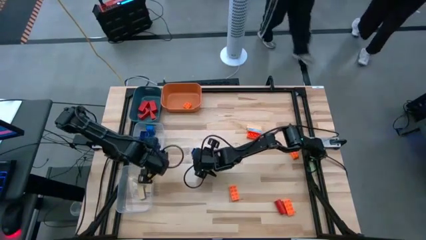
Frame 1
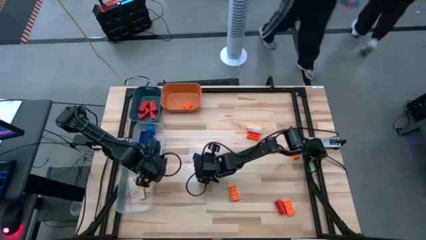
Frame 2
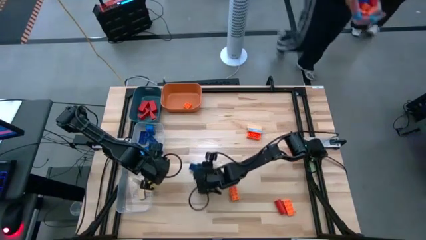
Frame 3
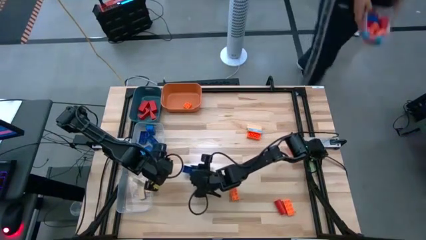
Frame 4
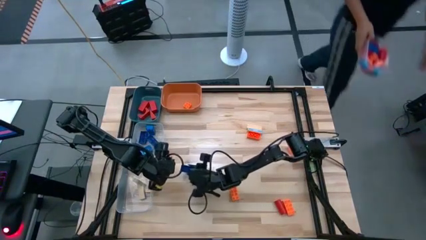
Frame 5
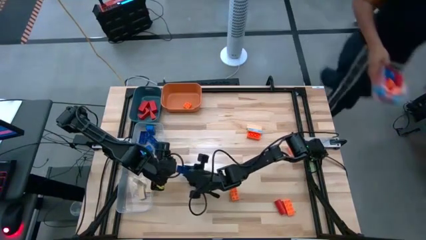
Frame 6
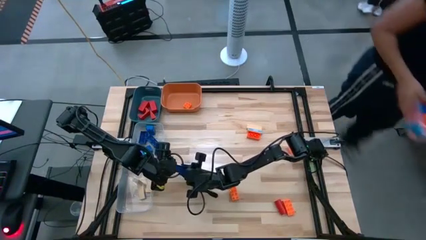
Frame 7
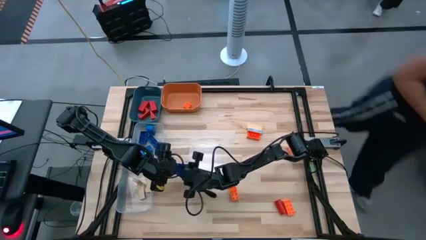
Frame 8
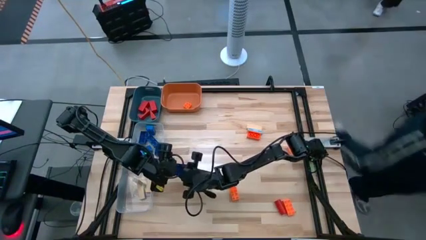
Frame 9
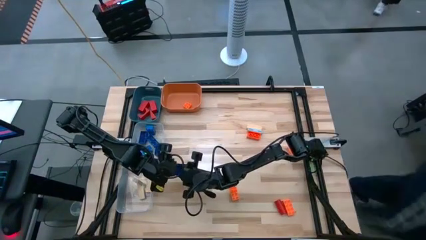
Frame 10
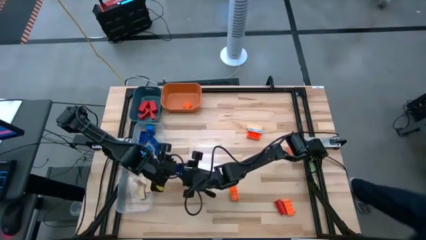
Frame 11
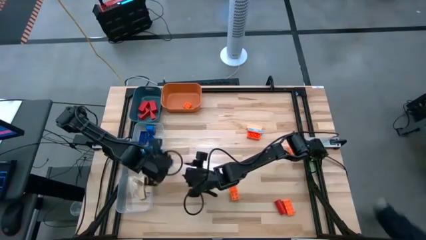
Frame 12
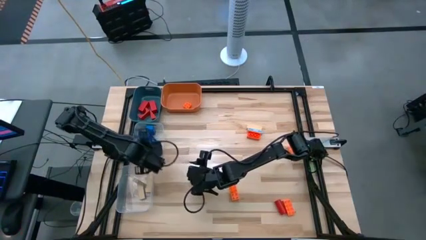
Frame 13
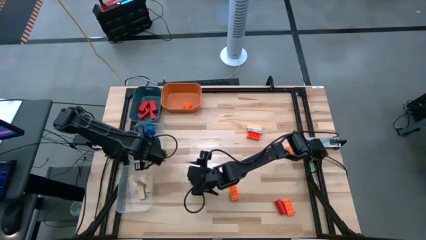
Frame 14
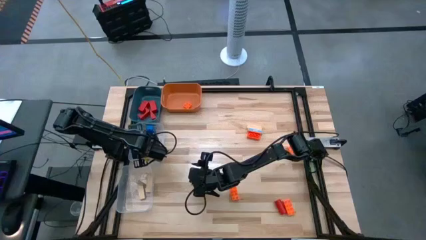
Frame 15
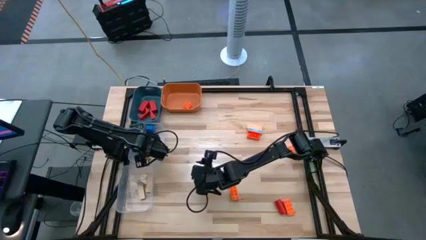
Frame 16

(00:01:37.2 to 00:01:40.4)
Task: Sort blocks
Put the blue game piece into the top transparent bin

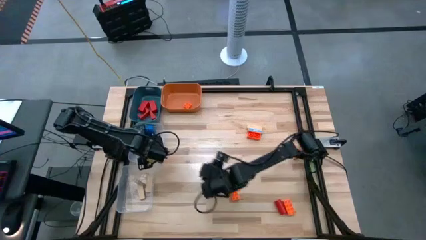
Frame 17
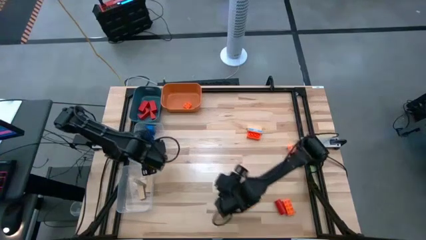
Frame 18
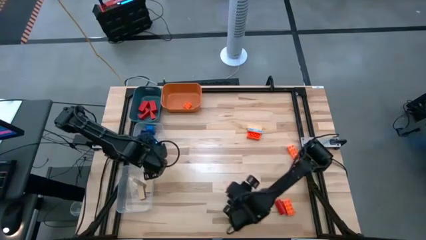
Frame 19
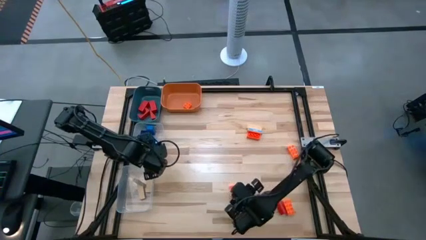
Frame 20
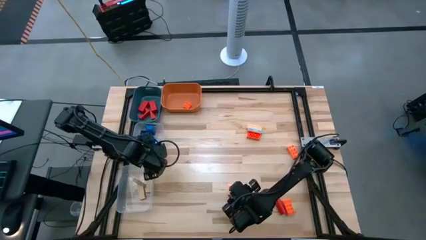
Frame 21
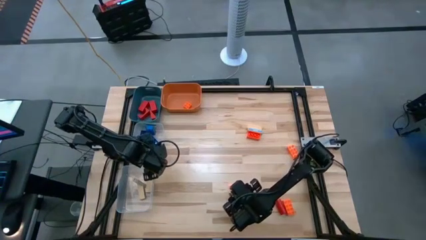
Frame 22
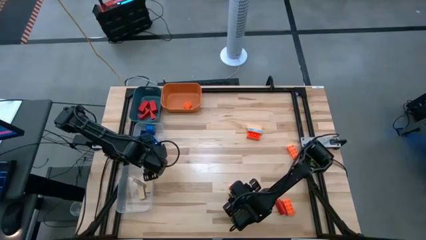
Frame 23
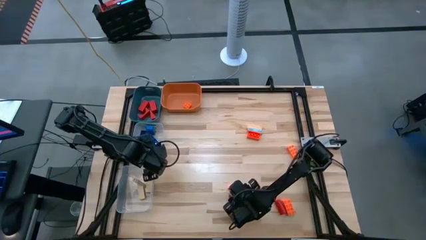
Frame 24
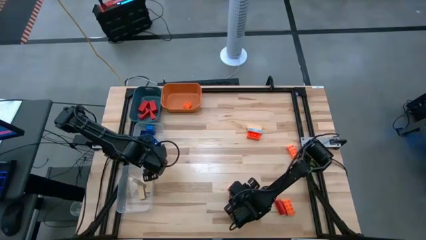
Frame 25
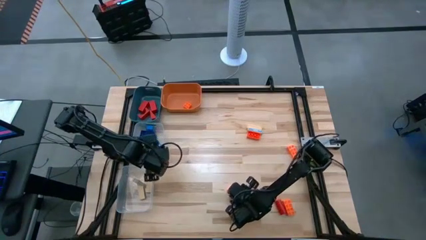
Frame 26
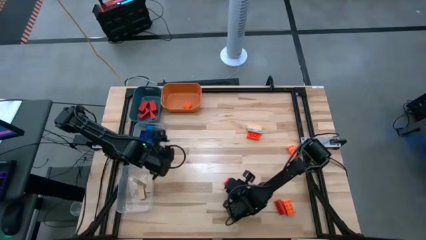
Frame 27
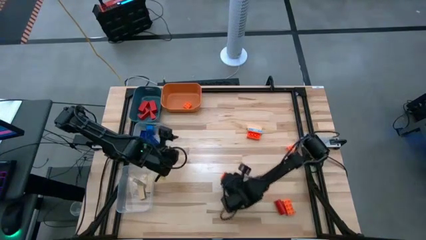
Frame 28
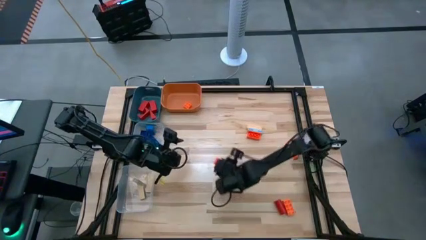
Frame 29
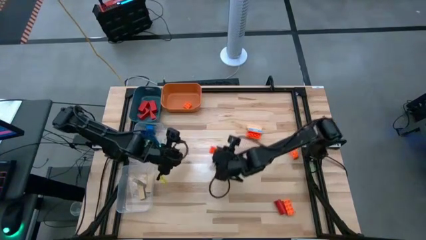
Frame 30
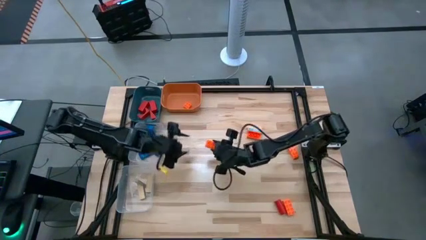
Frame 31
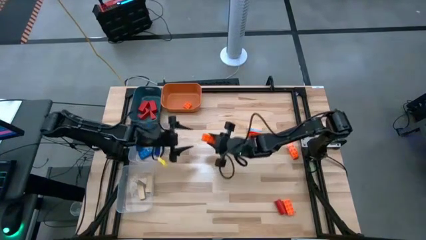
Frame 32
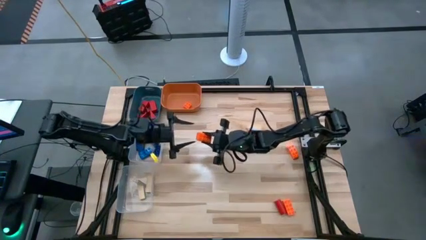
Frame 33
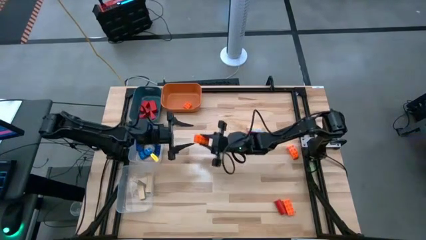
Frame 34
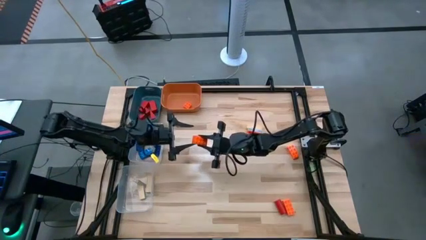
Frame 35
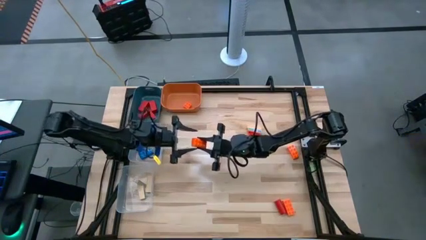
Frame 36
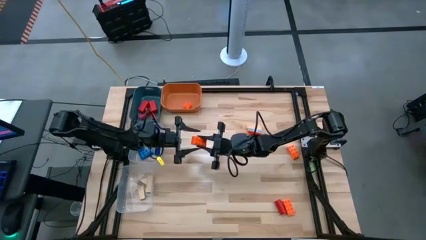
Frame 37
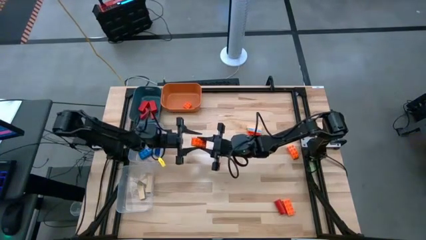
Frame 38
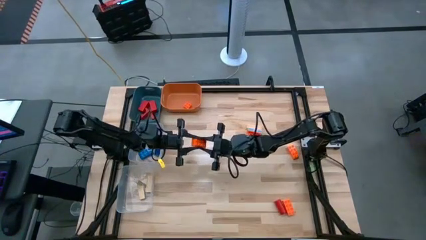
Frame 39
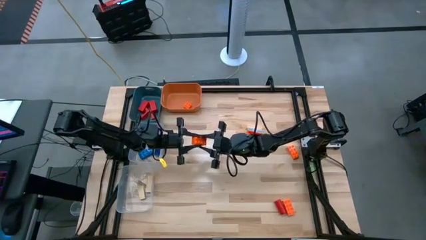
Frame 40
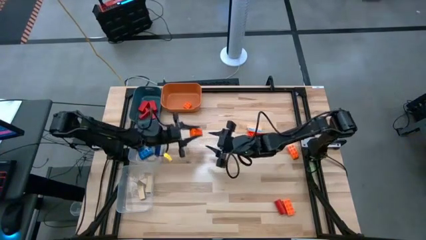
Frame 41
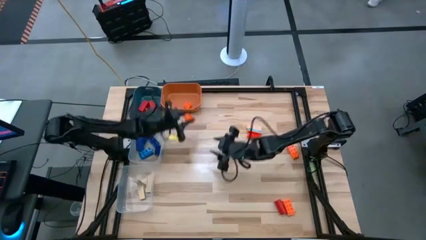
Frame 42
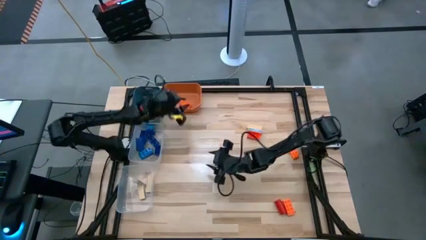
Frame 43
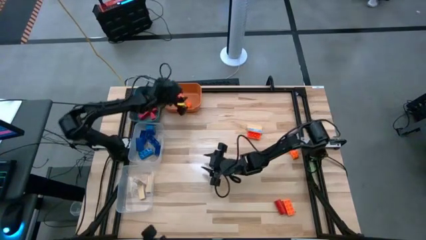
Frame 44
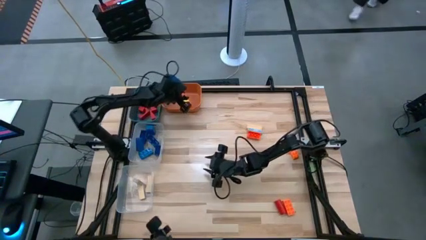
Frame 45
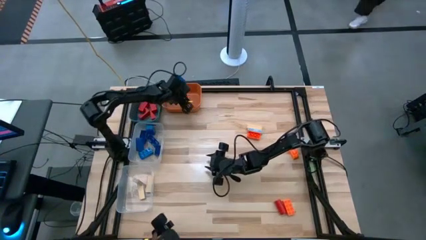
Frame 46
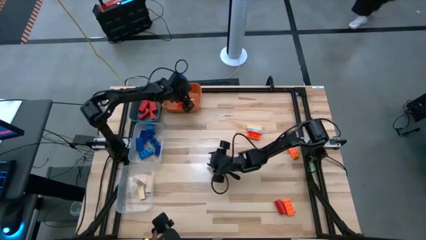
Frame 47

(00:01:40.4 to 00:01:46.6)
Put the orange game piece into the orange bin

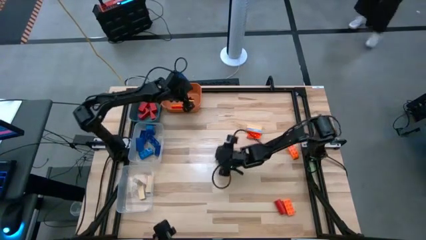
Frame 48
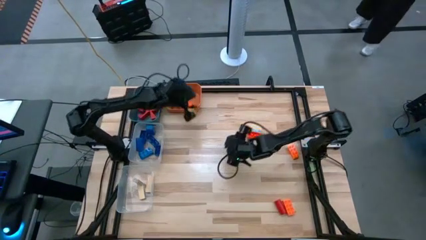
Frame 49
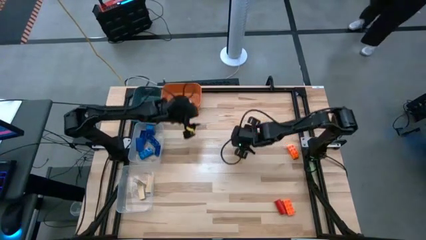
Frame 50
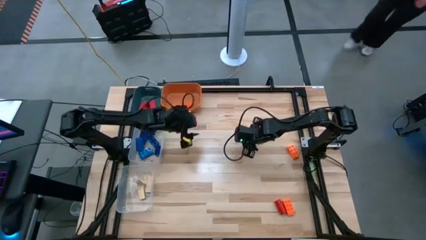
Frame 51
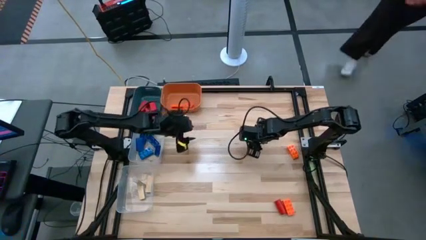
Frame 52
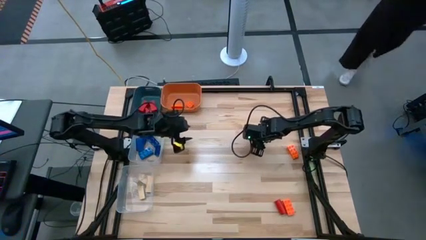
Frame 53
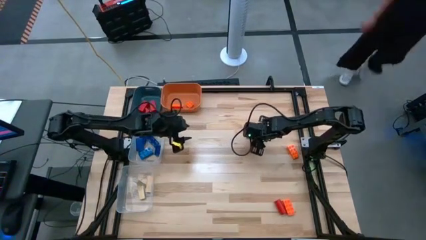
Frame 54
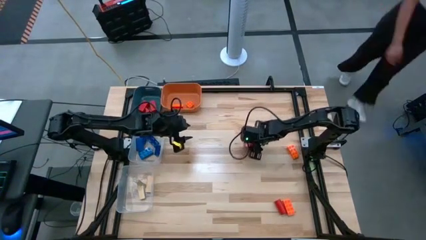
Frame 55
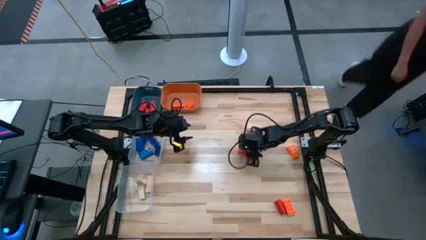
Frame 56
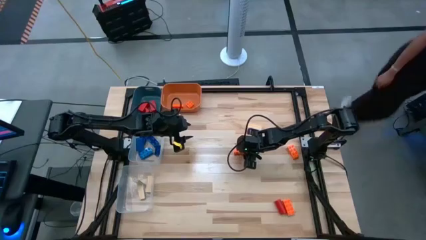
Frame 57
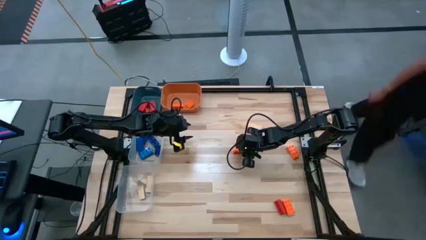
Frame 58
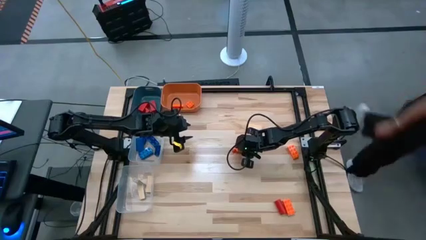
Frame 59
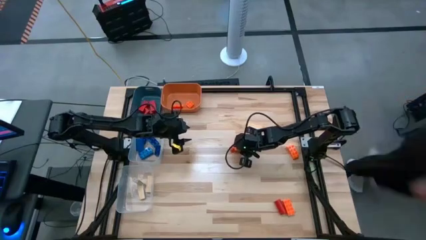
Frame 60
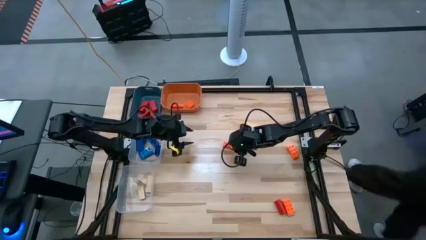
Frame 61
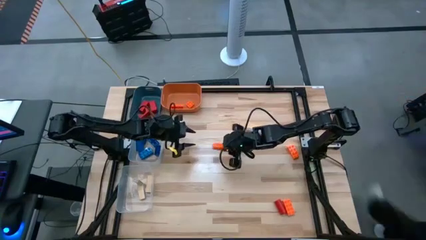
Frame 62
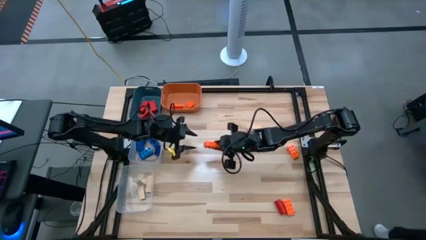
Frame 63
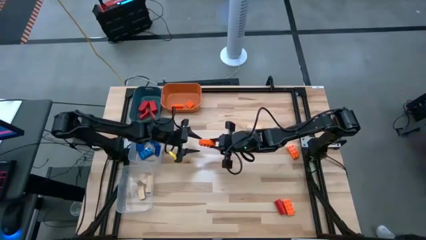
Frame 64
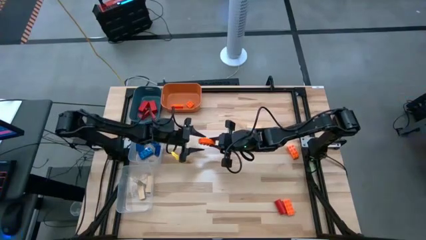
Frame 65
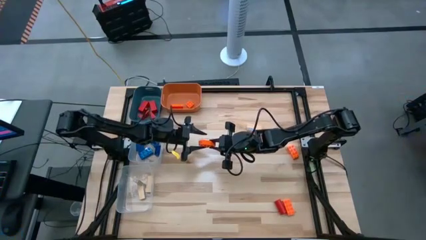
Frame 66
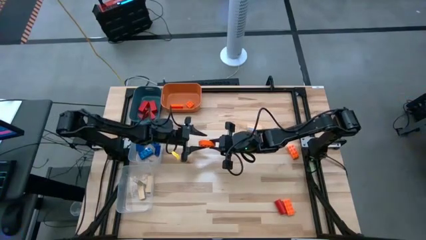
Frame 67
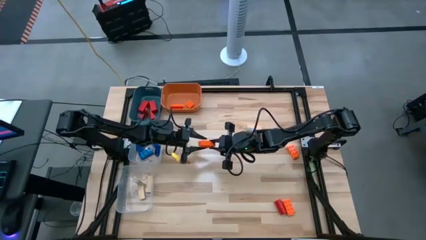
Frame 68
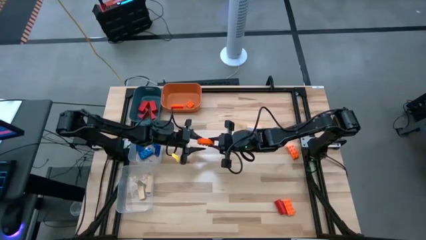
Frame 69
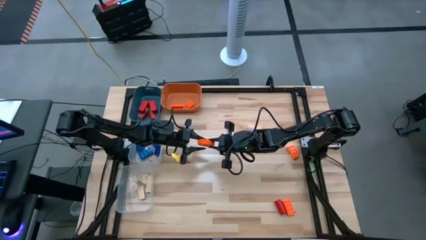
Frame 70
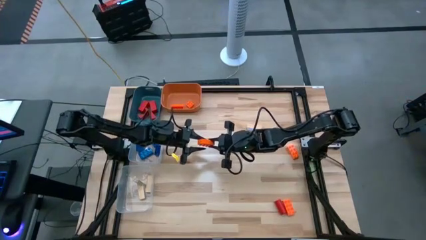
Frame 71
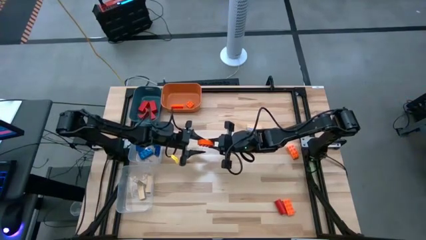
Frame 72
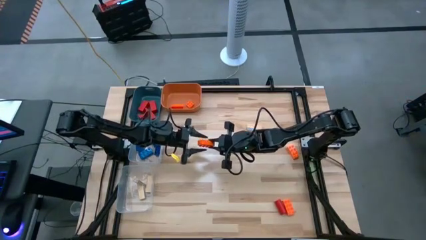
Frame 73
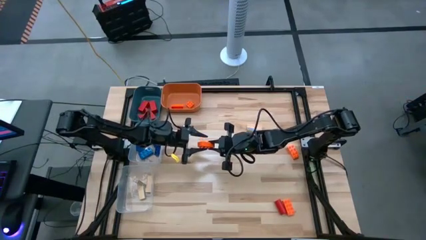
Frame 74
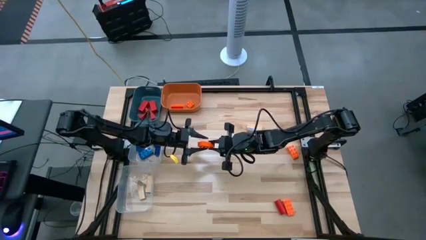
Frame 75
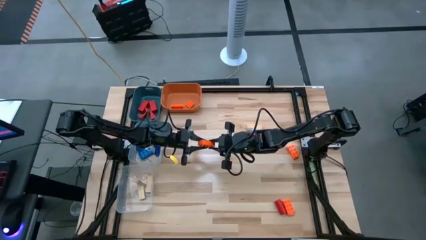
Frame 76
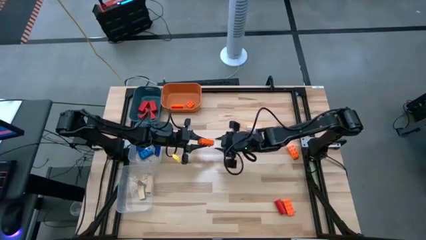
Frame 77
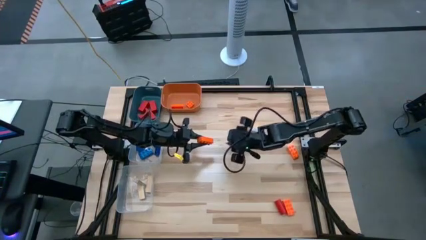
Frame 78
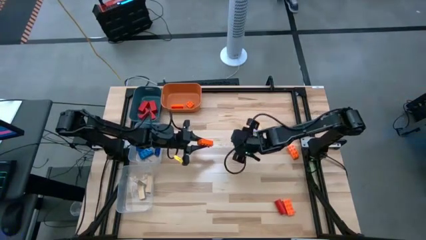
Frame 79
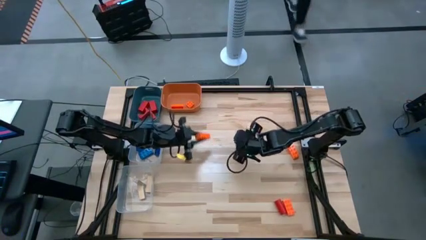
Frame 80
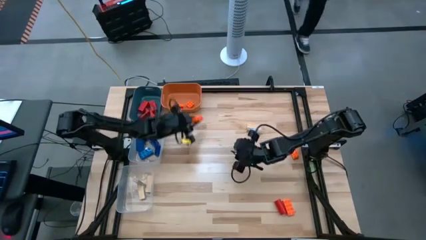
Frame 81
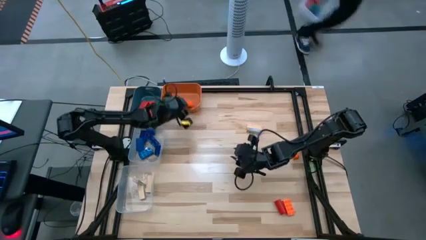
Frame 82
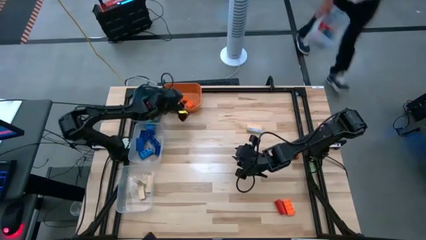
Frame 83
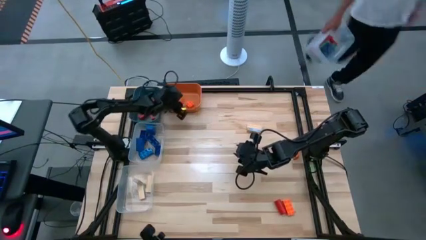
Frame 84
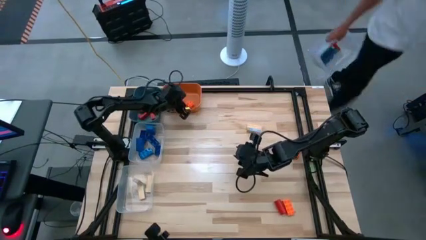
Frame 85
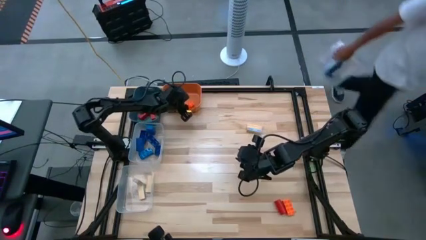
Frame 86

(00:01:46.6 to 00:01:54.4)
Put the orange game piece into the orange bin
